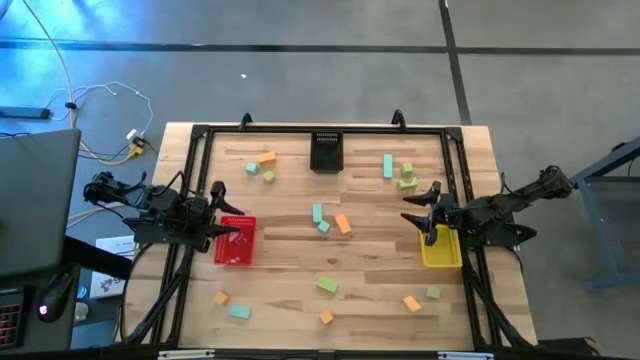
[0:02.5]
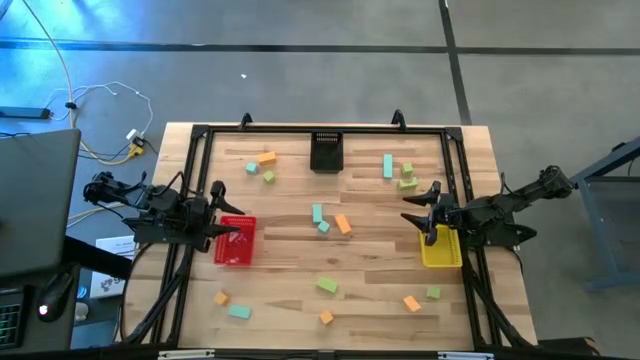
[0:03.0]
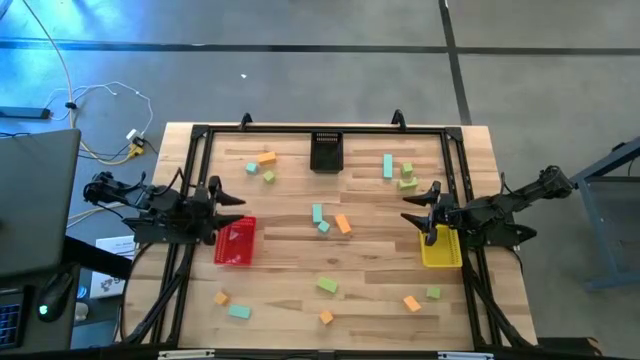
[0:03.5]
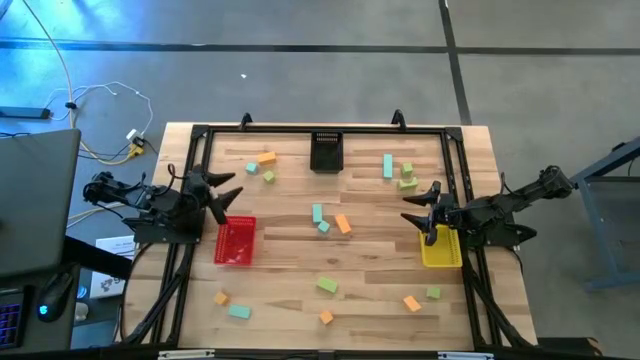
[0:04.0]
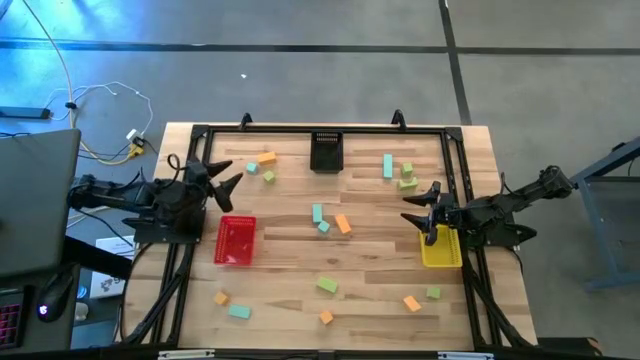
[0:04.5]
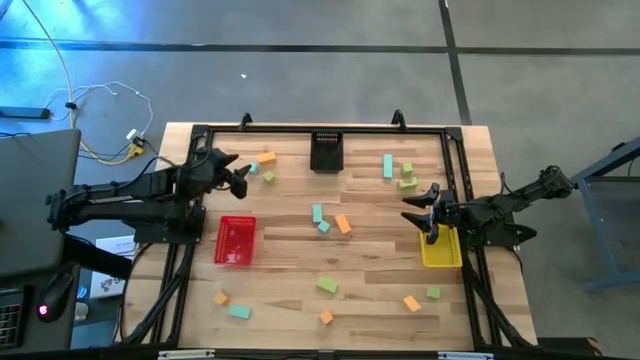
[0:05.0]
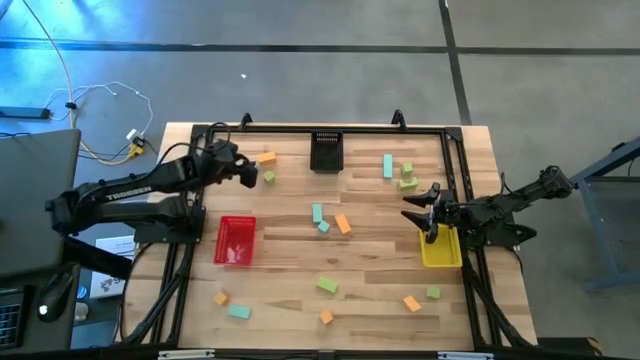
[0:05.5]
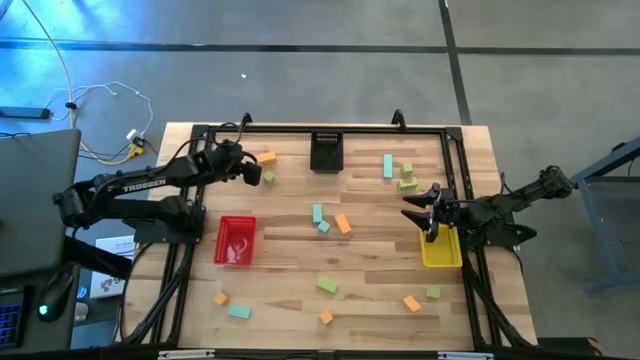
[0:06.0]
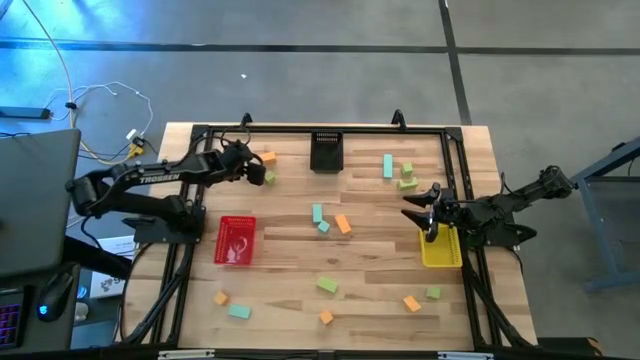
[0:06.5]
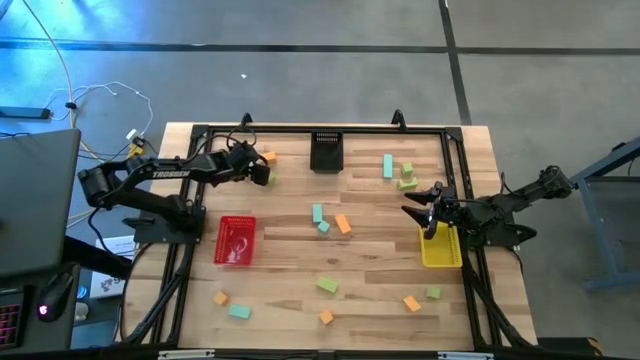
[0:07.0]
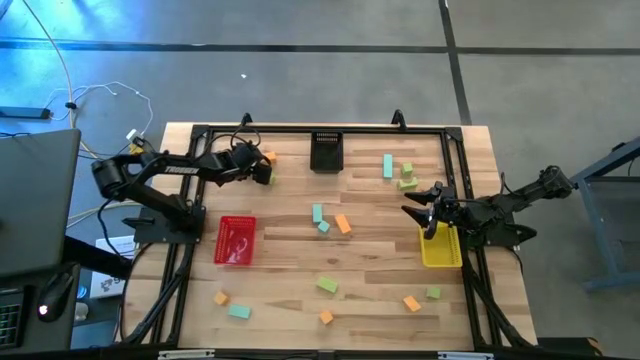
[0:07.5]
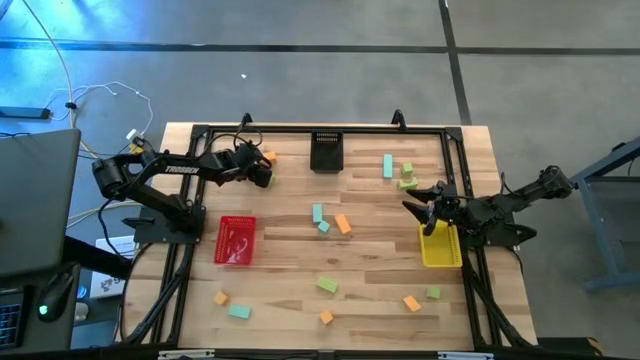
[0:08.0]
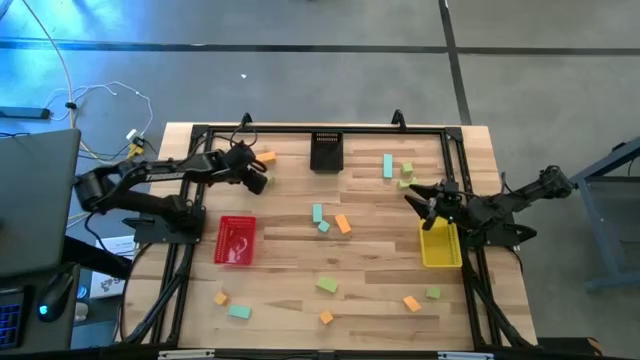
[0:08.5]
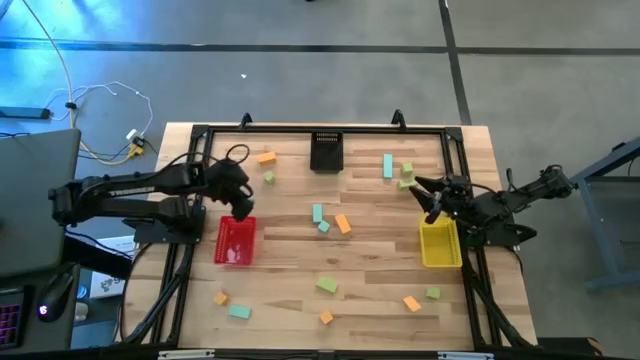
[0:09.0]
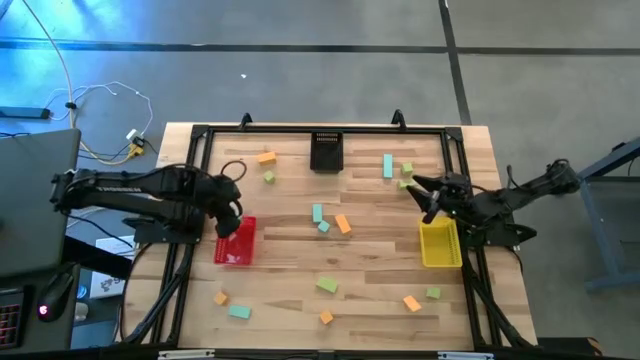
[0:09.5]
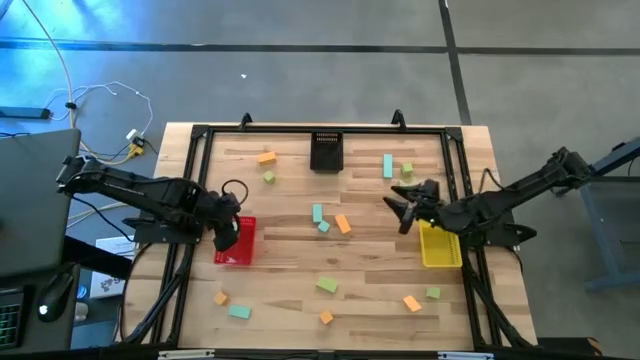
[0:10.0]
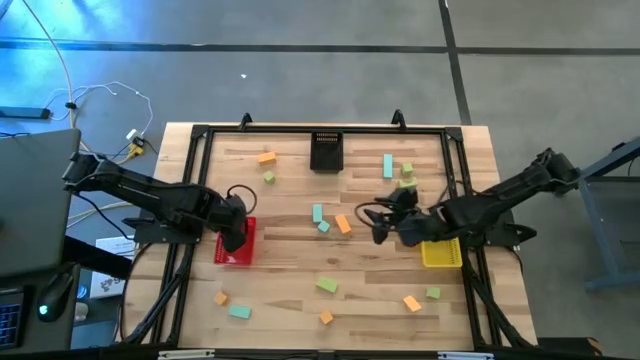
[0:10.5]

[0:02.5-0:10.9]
Task: Sort & place blocks by color
Put the blue block into the red bin

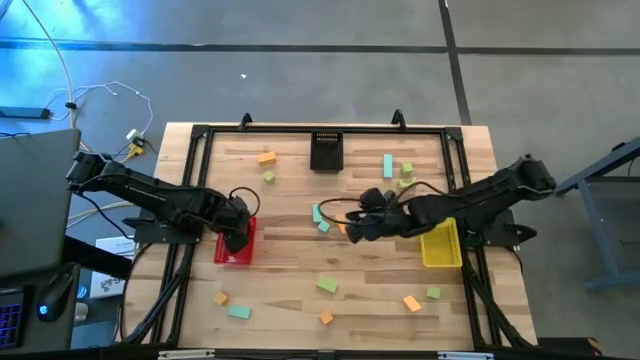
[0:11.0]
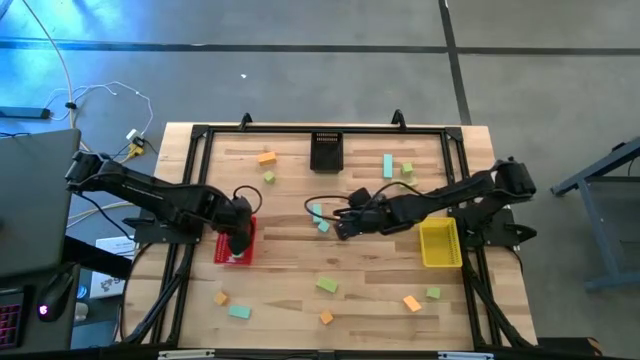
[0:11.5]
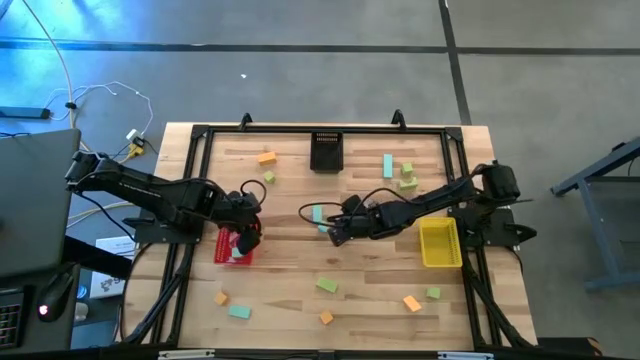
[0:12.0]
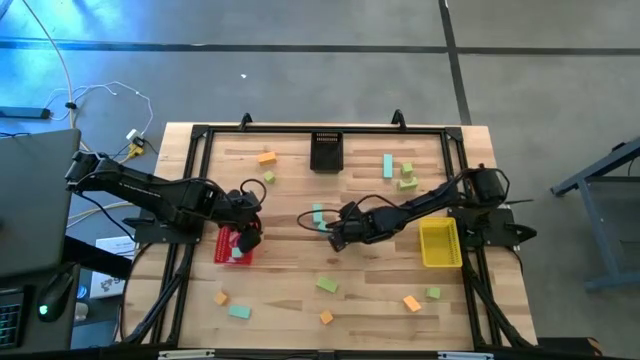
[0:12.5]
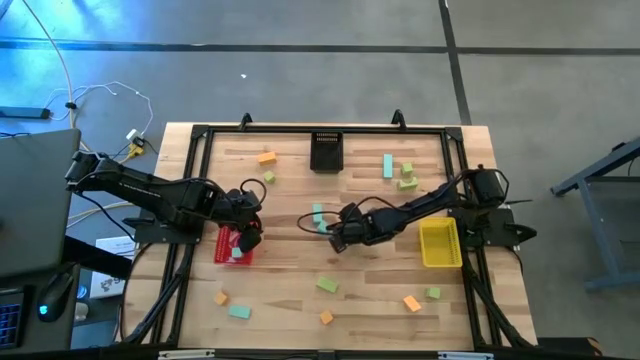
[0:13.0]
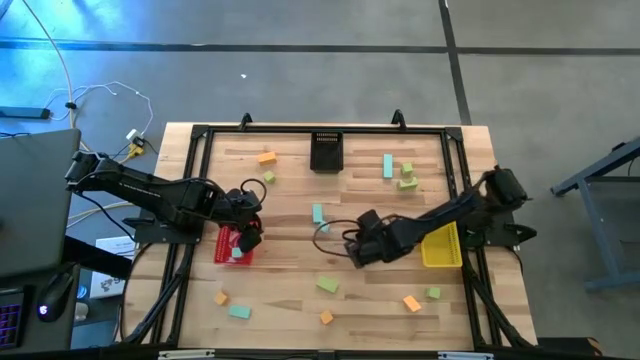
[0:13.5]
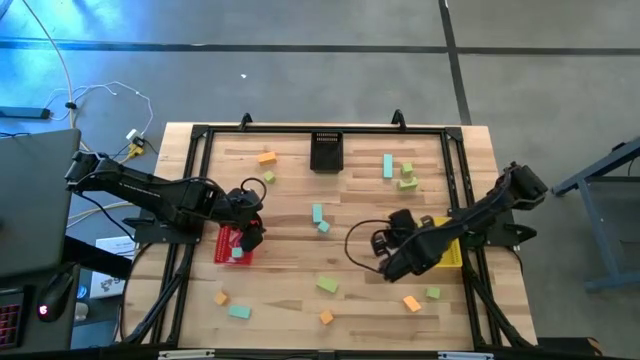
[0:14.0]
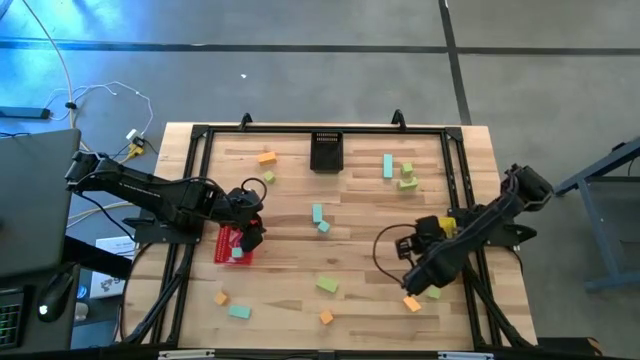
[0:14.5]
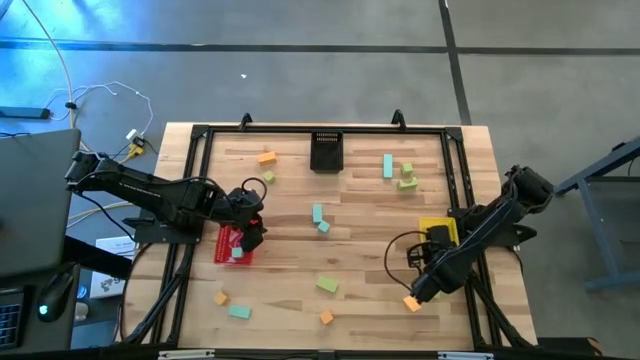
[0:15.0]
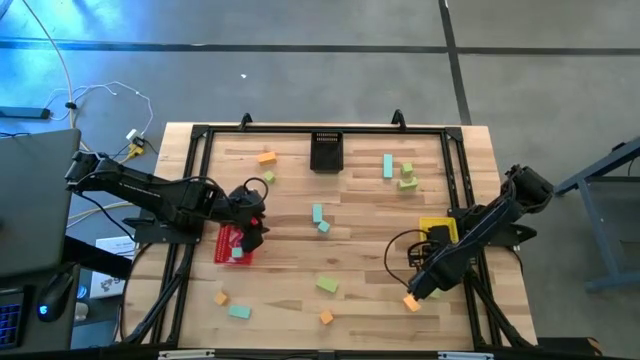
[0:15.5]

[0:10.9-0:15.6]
Put the yellow block into the yellow bin

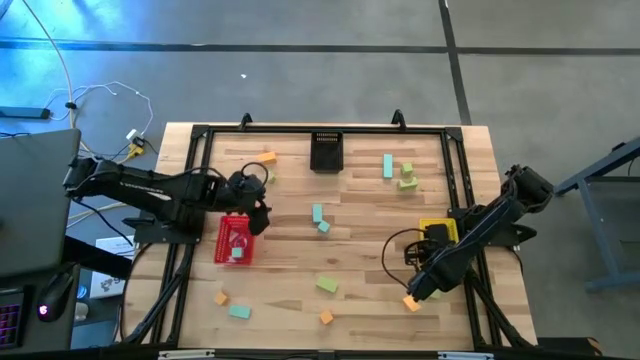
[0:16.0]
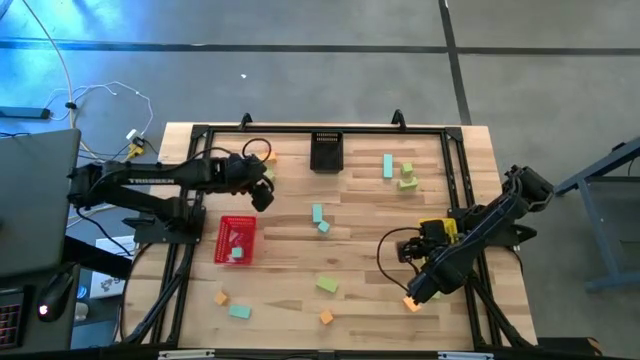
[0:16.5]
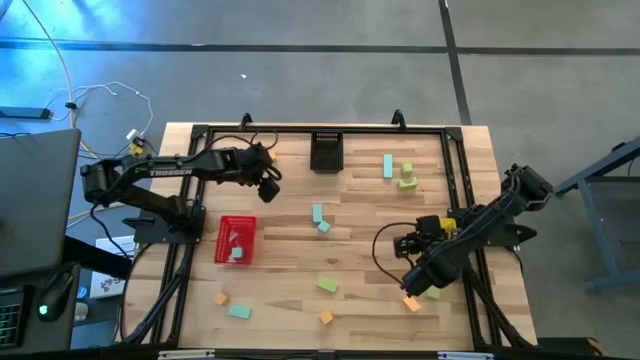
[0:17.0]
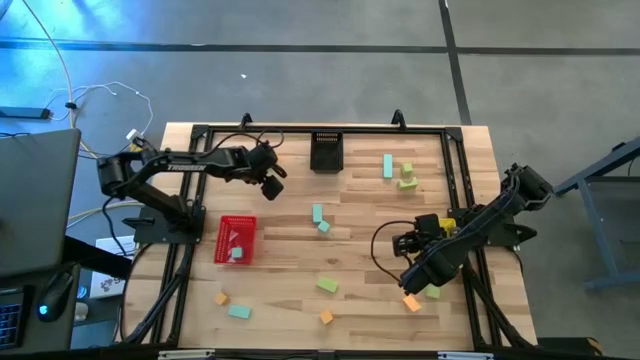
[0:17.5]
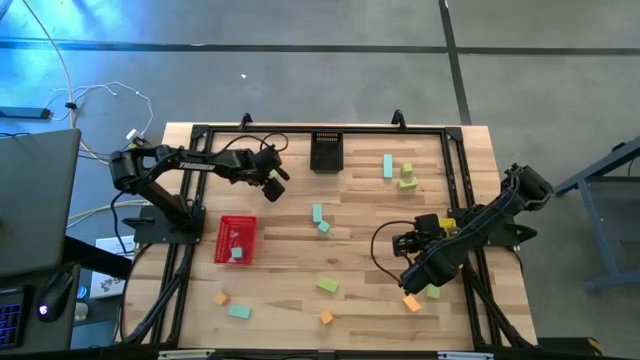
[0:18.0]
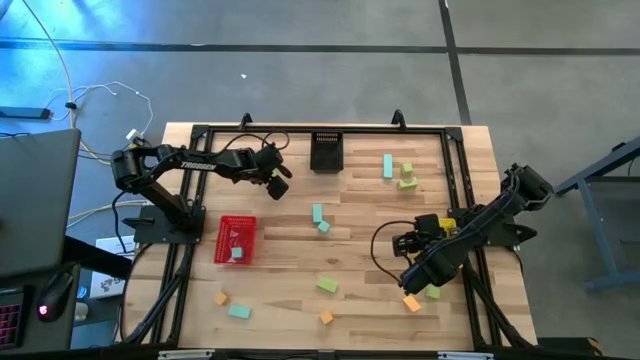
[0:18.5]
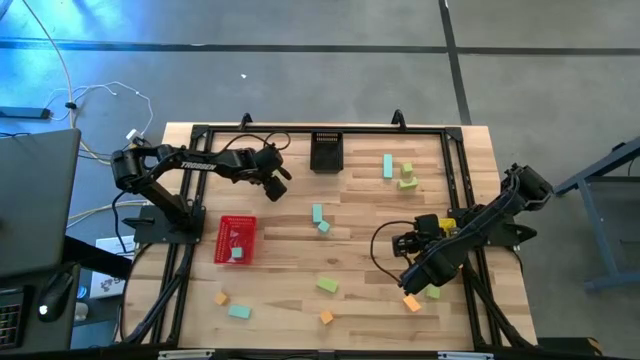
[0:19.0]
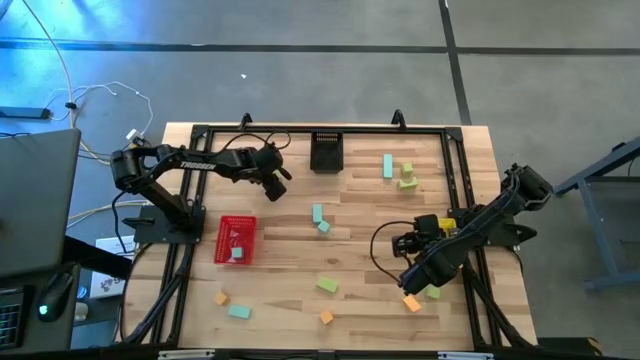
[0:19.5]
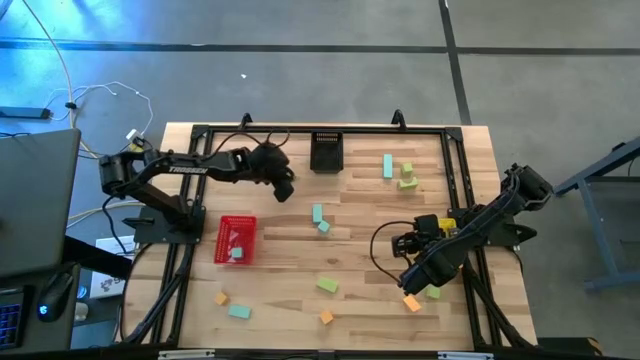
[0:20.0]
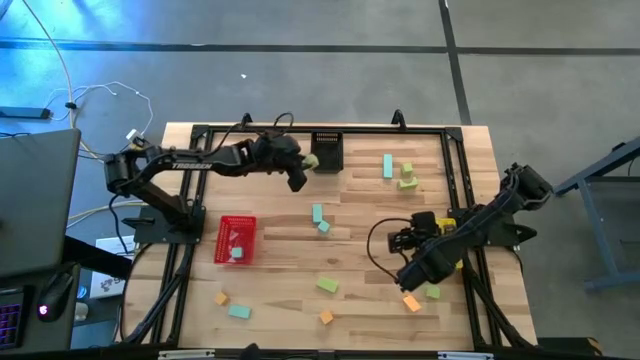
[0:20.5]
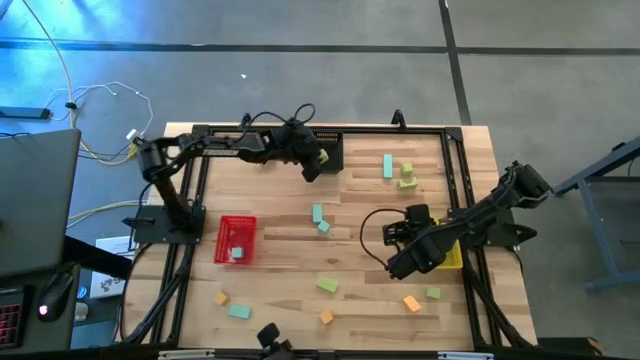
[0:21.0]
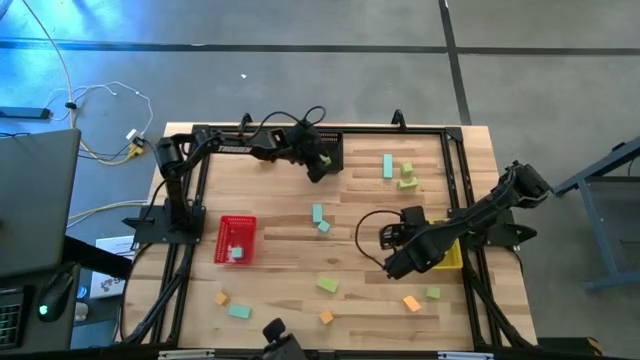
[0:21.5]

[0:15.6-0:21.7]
Put the green block into the black bin
